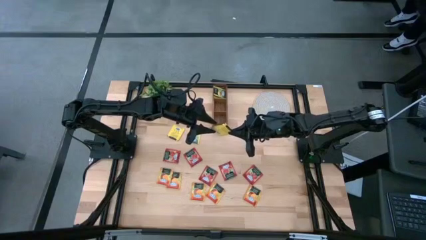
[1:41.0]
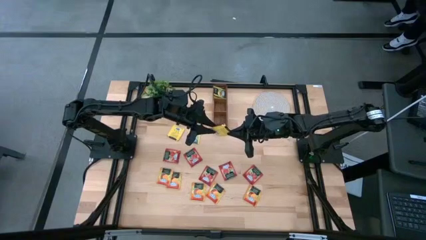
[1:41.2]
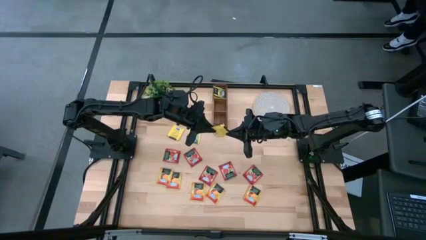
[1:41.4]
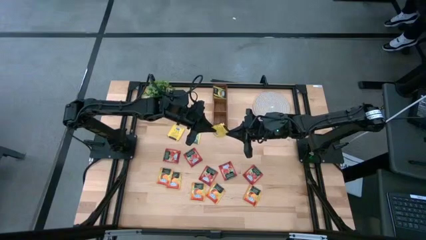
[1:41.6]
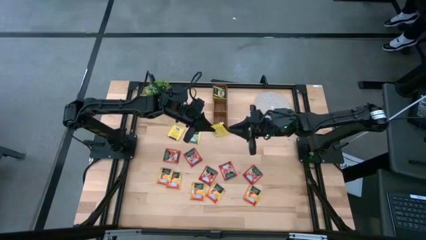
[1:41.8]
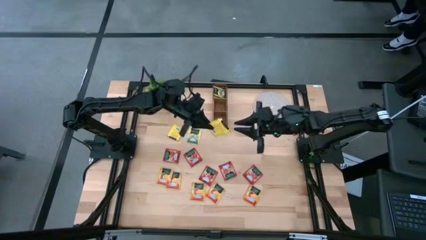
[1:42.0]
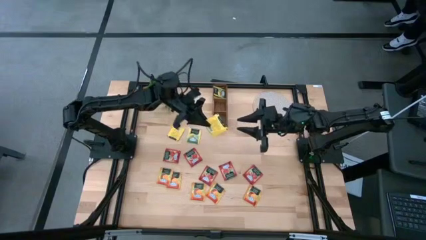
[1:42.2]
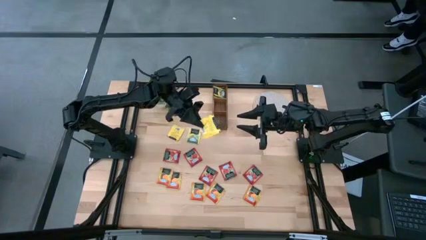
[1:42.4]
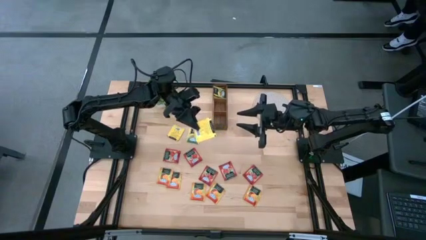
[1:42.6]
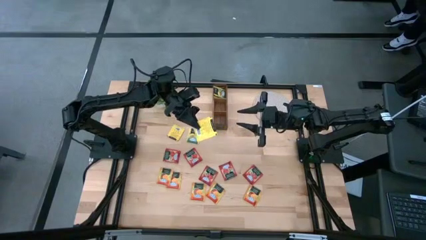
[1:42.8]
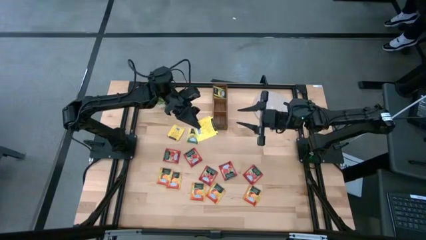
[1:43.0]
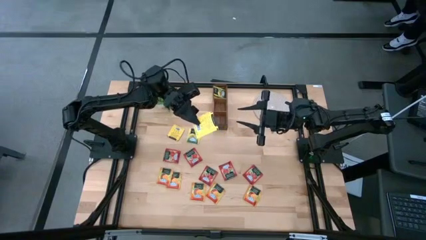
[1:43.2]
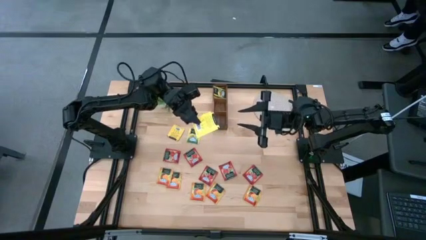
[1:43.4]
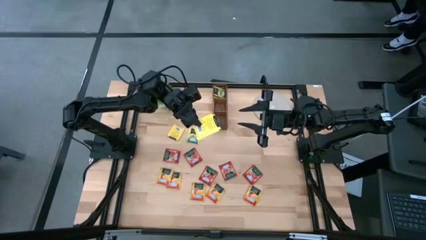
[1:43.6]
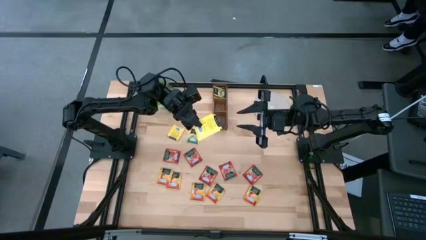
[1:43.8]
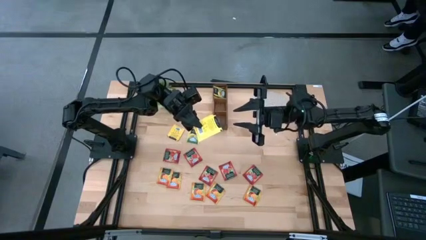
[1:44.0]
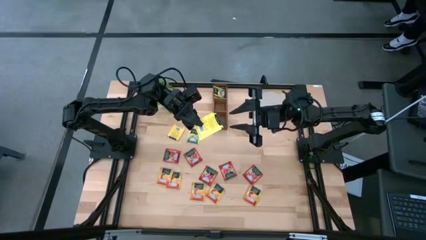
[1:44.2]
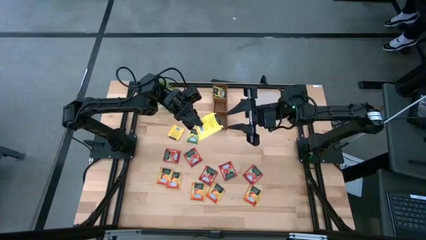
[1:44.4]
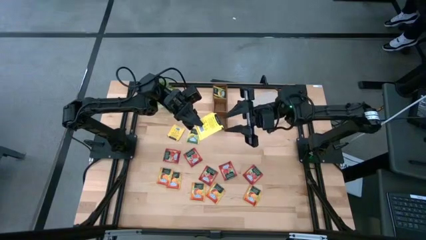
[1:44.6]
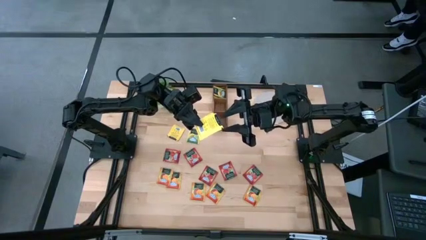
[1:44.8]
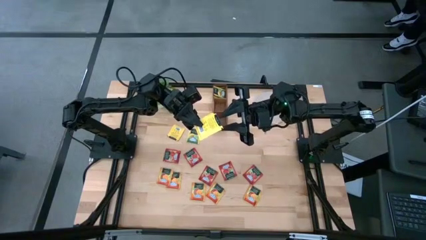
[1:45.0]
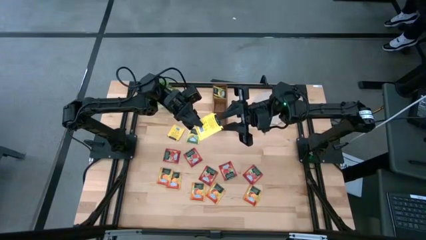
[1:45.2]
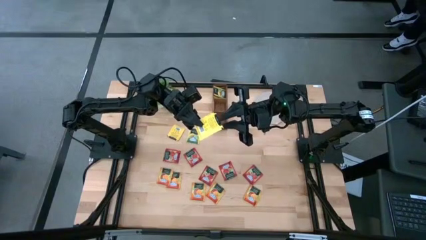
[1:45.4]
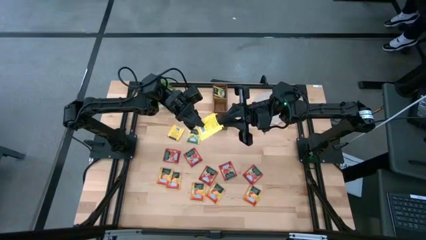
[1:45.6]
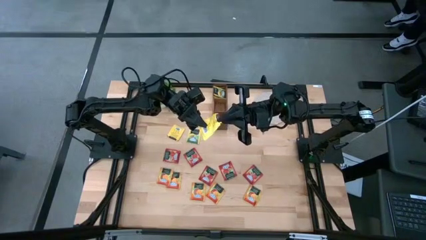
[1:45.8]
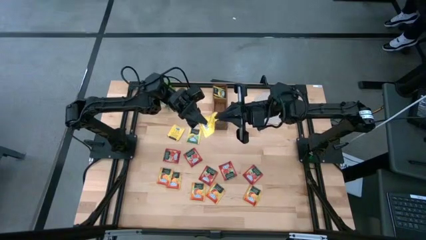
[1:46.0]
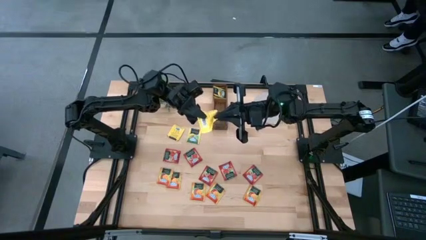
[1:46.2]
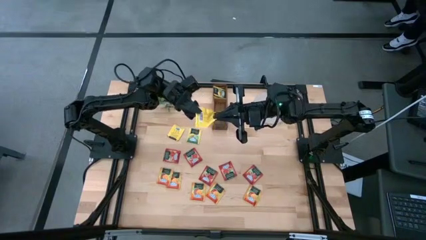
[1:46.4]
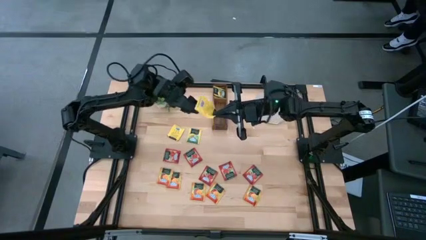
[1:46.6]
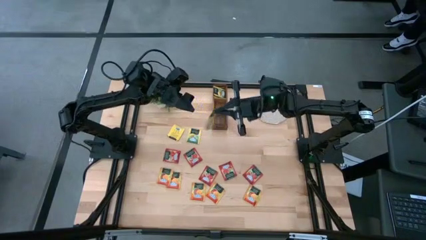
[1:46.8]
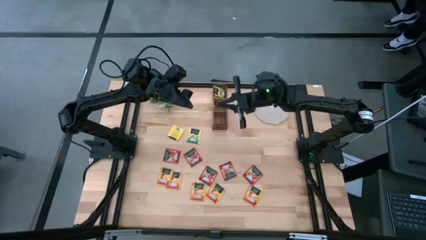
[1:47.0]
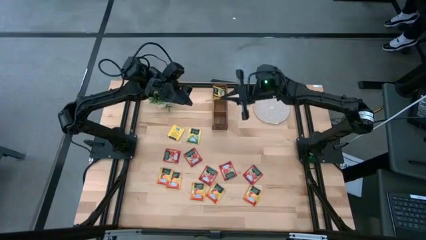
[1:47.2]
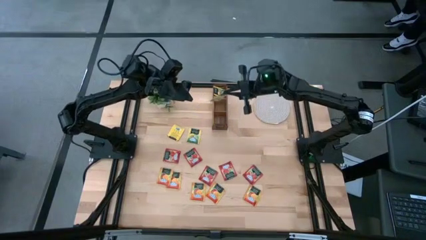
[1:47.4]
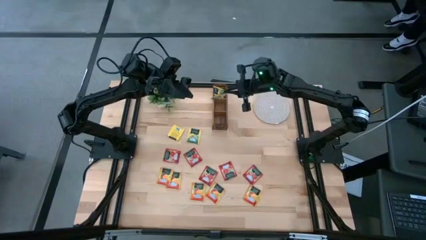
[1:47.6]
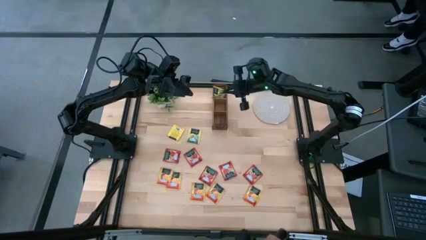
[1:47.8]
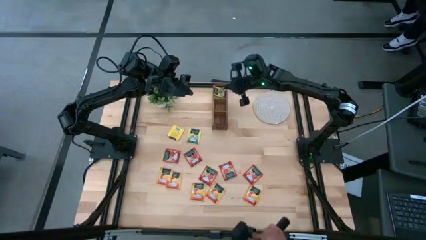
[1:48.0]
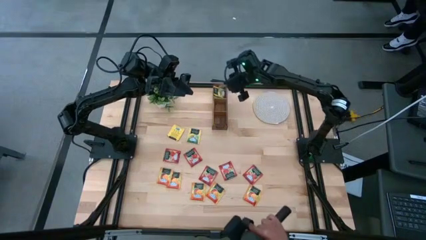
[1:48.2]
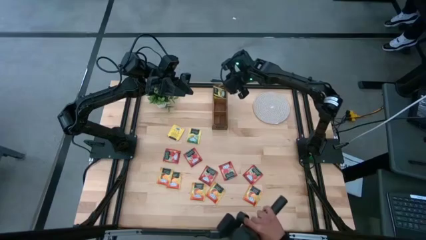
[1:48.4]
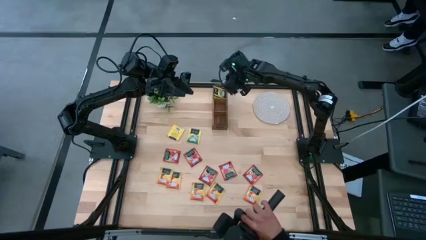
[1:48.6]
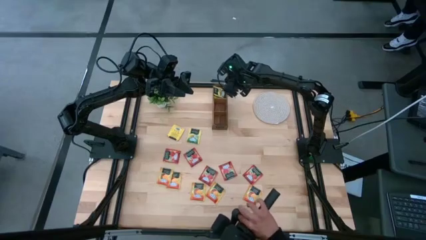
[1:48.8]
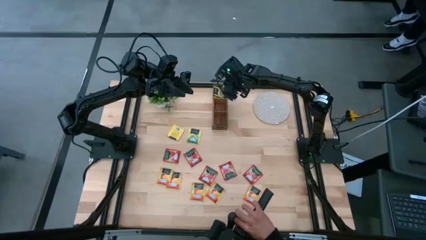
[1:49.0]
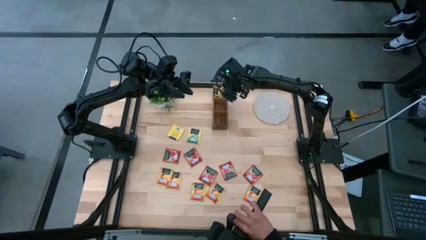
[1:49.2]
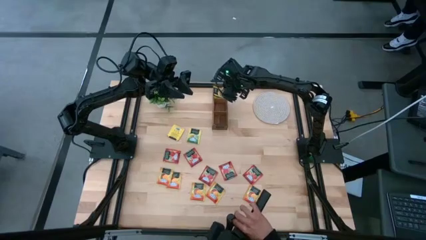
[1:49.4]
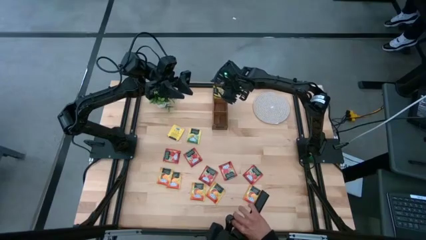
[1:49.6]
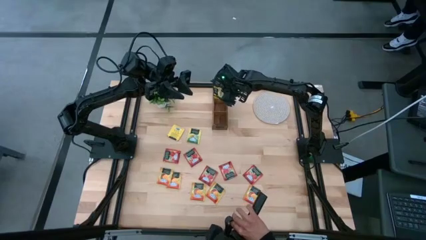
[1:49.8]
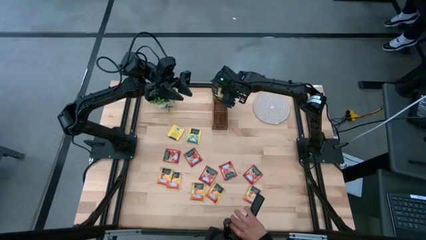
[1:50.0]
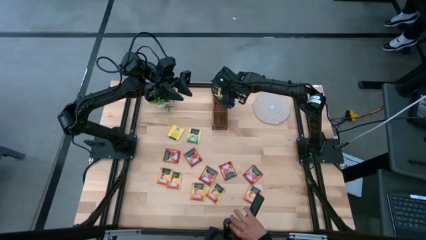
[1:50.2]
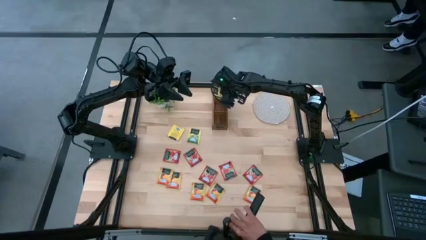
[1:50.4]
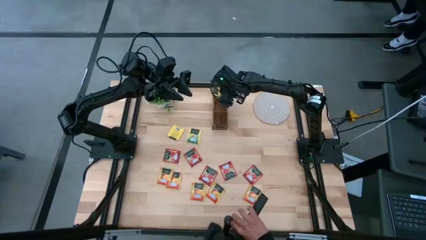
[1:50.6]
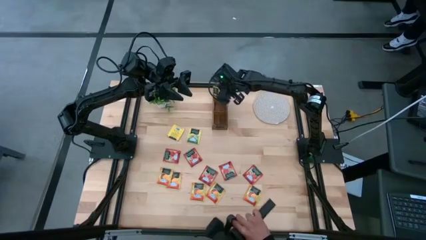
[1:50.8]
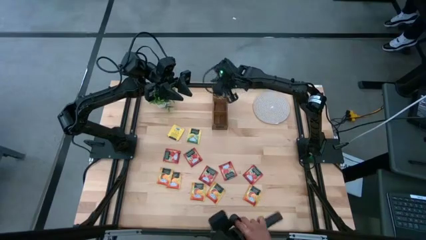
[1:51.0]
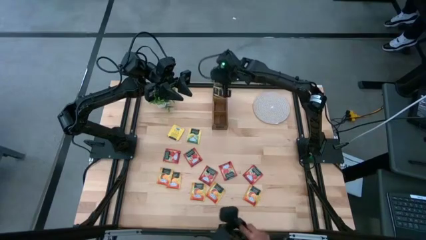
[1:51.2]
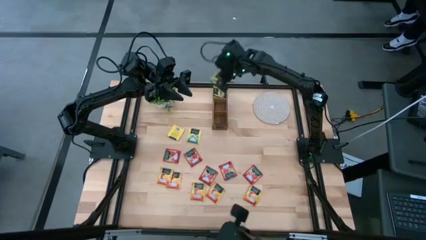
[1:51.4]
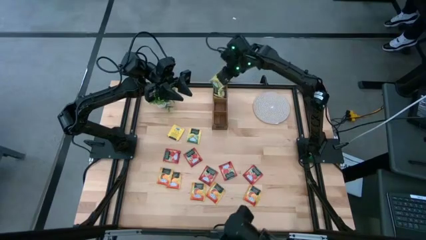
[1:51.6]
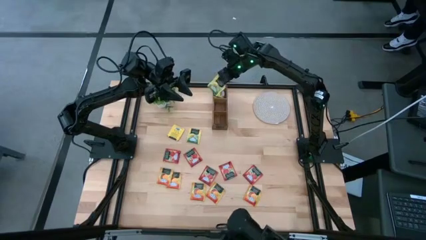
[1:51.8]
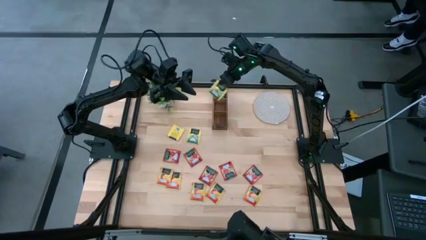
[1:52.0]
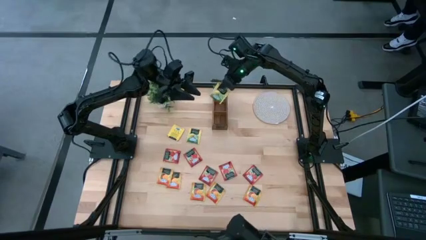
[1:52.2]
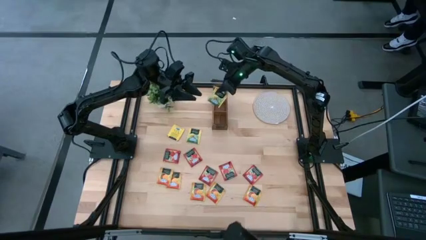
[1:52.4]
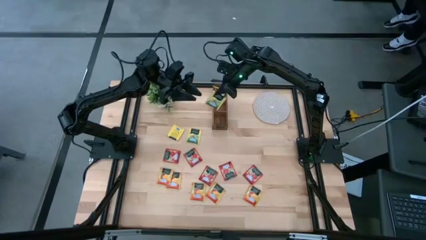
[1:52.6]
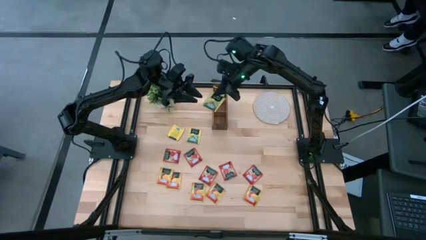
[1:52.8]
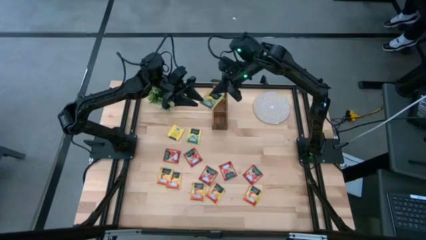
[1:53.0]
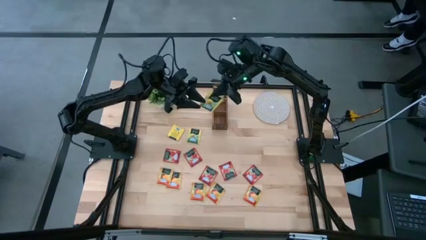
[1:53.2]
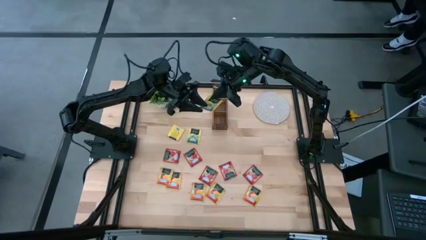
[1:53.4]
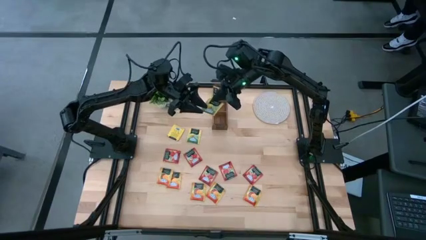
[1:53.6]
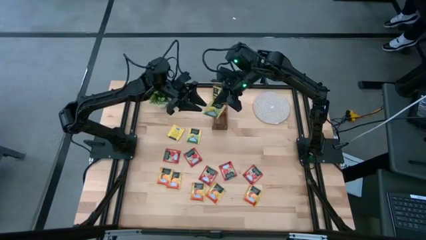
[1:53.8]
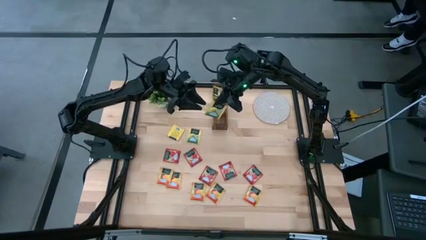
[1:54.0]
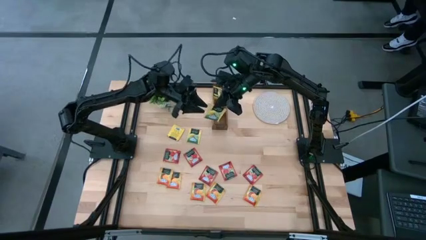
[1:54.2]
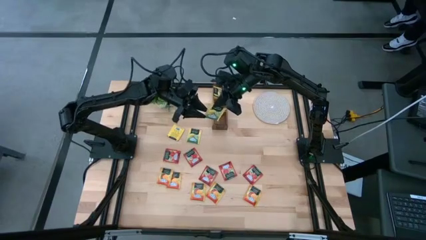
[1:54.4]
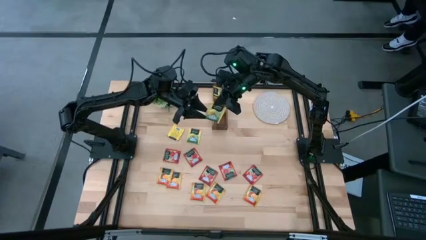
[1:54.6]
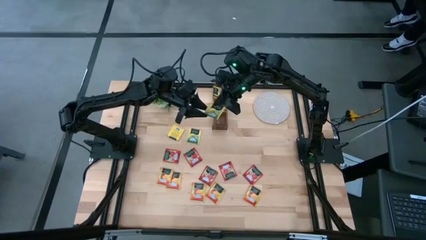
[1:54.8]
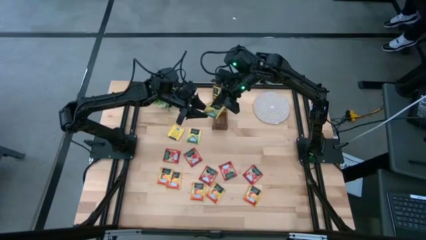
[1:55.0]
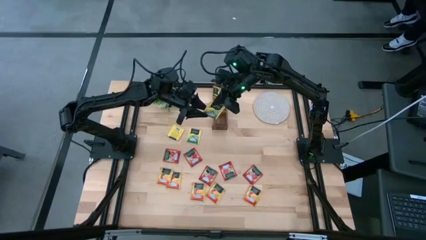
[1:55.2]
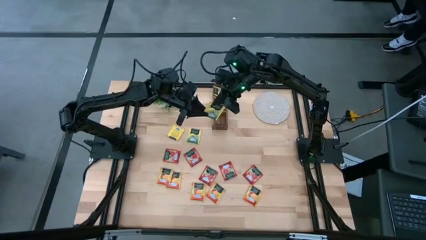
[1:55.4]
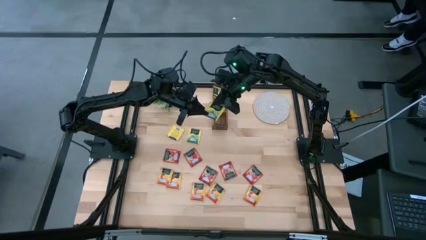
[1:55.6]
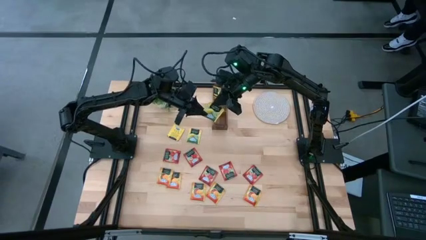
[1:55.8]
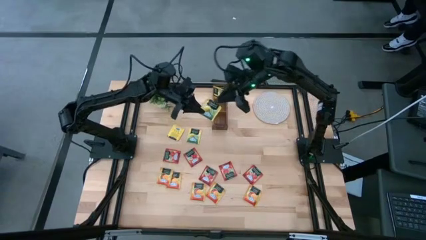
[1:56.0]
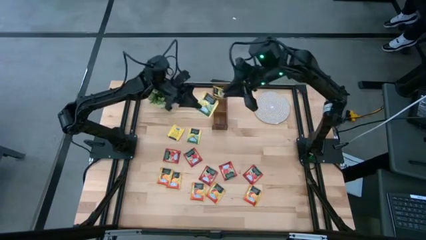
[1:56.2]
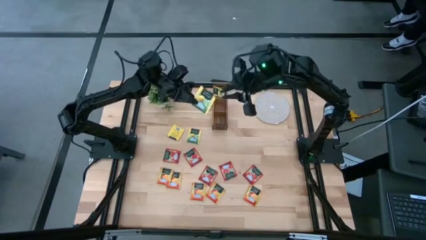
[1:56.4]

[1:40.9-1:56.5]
Task: Pick & Place Tea
Put the yellow tea bag into the left section of the wooden organizer

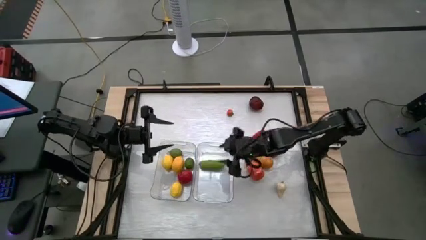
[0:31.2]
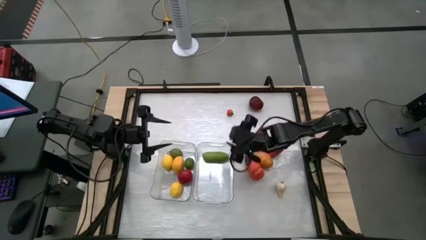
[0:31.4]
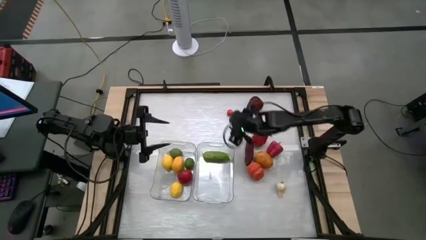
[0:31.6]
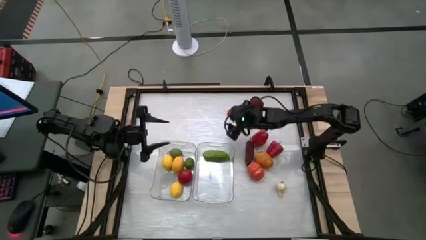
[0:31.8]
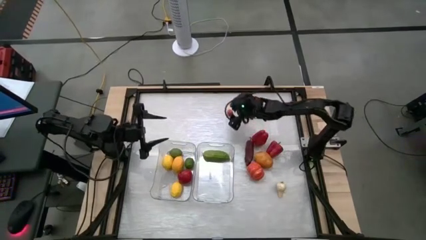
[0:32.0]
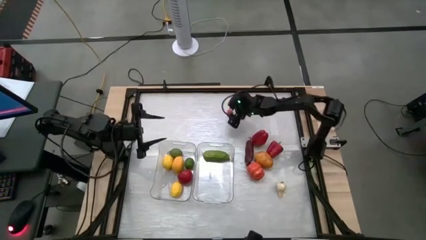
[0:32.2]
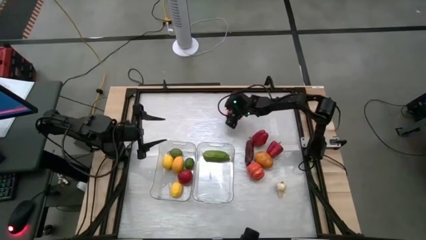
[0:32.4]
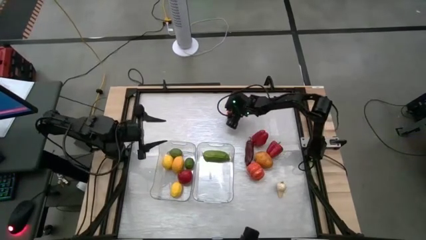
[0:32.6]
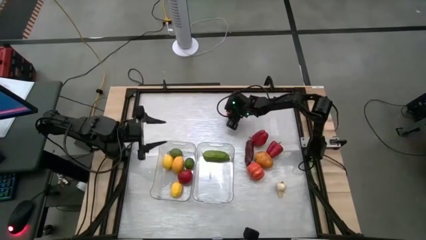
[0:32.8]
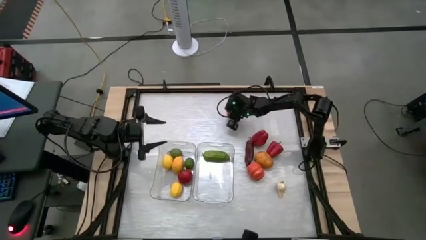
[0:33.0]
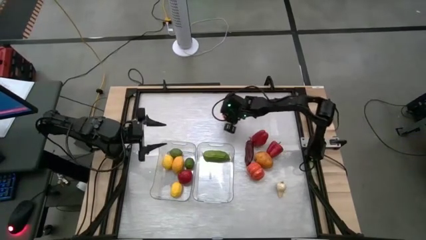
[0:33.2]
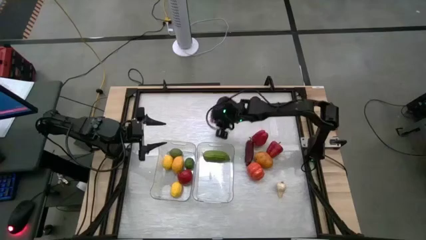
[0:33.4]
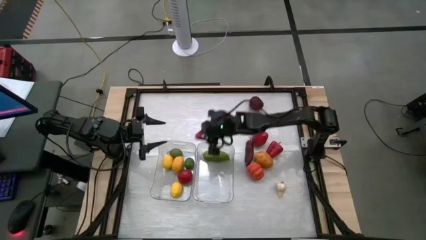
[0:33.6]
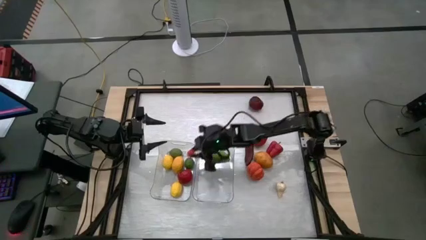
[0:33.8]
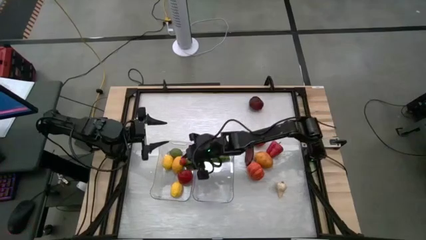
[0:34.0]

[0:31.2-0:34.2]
Task: Sort produce into baskets
Put the tomato into the right transparent bin
